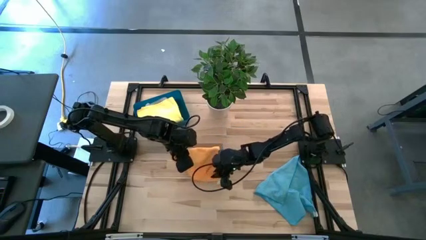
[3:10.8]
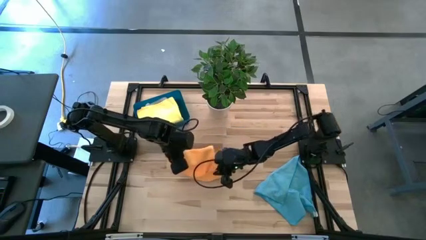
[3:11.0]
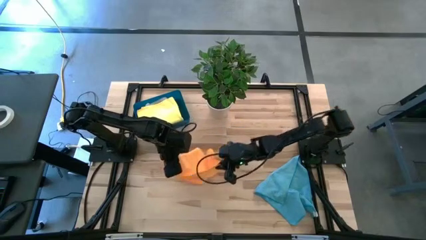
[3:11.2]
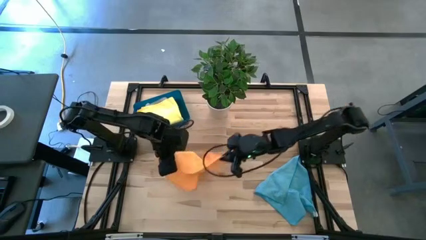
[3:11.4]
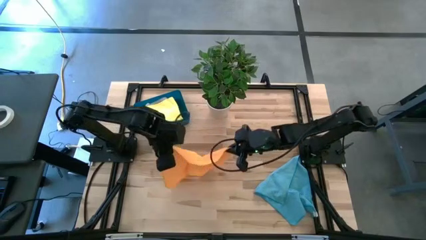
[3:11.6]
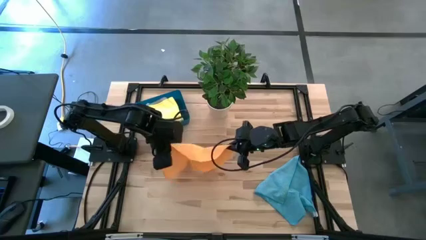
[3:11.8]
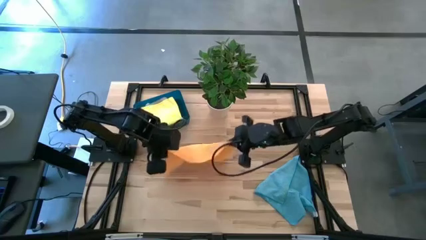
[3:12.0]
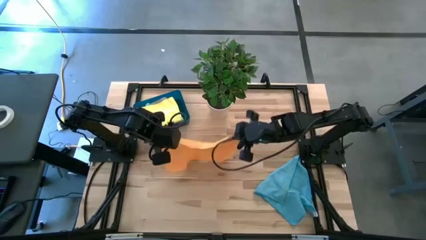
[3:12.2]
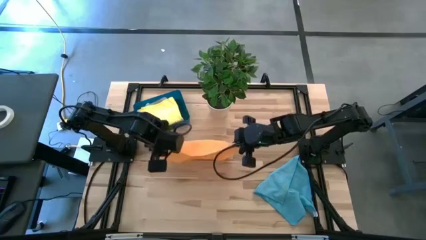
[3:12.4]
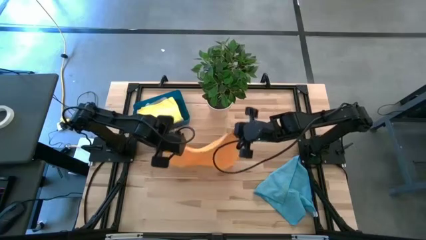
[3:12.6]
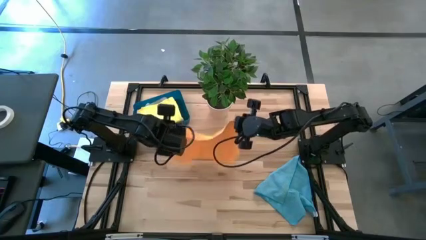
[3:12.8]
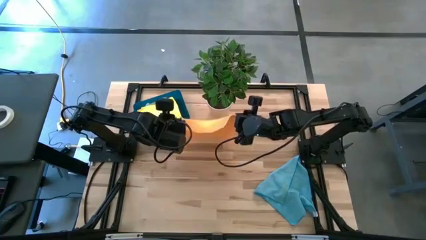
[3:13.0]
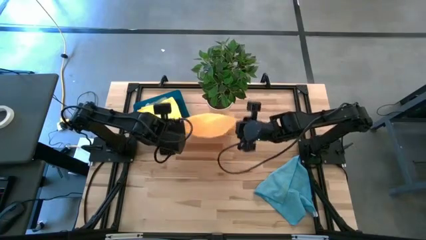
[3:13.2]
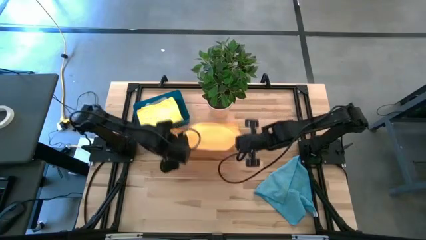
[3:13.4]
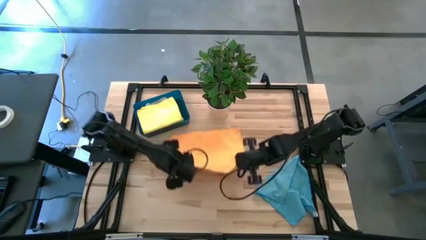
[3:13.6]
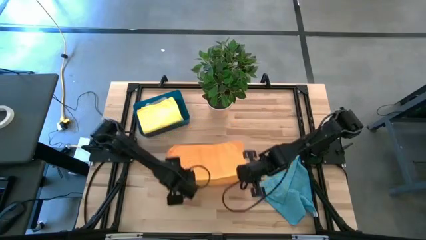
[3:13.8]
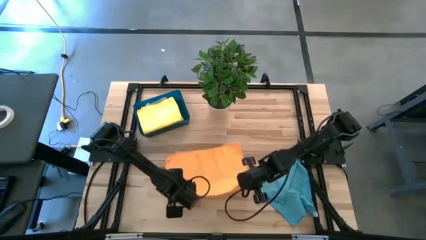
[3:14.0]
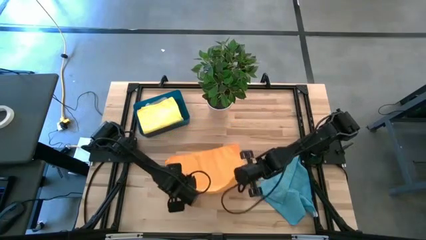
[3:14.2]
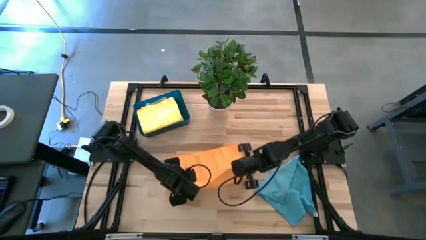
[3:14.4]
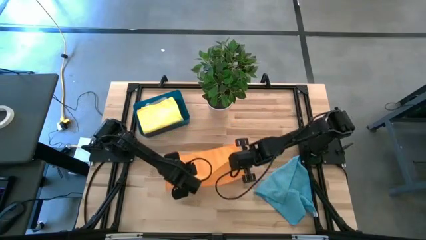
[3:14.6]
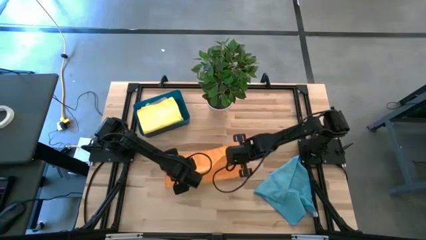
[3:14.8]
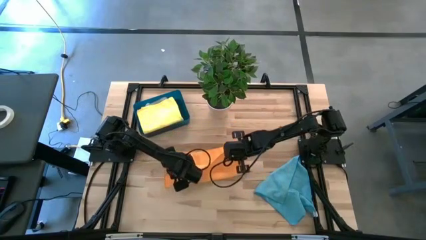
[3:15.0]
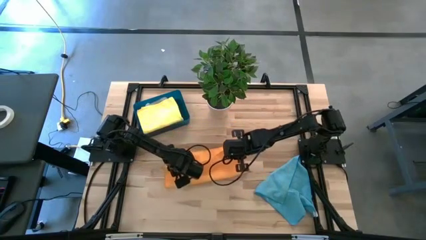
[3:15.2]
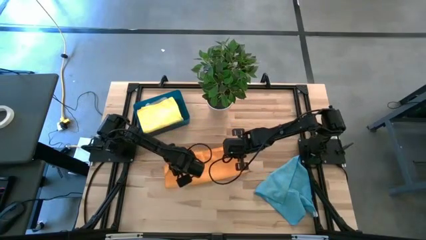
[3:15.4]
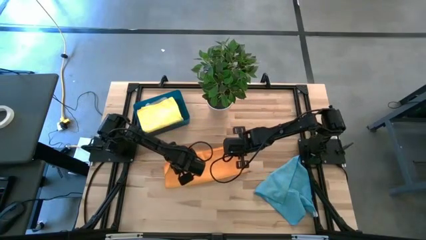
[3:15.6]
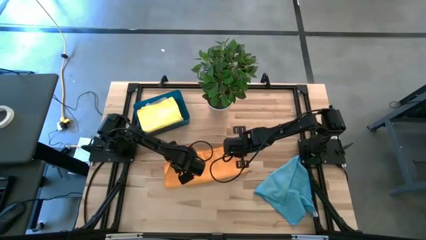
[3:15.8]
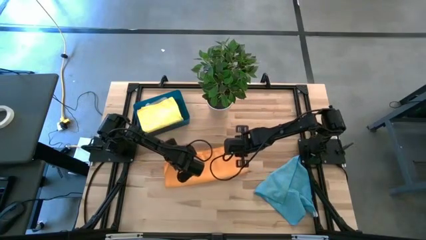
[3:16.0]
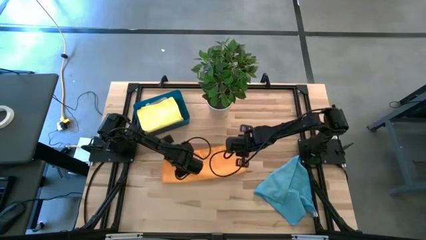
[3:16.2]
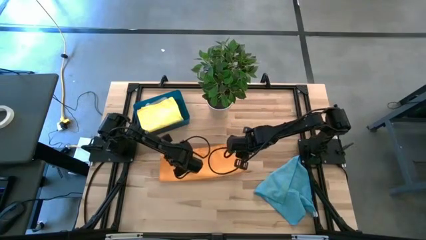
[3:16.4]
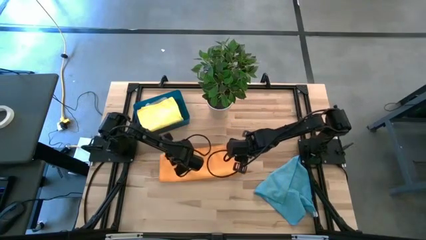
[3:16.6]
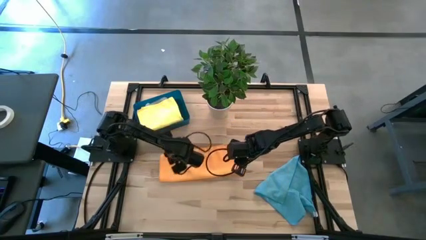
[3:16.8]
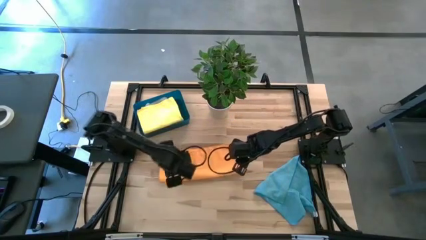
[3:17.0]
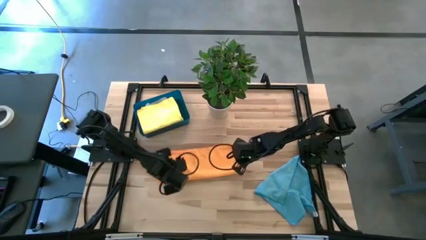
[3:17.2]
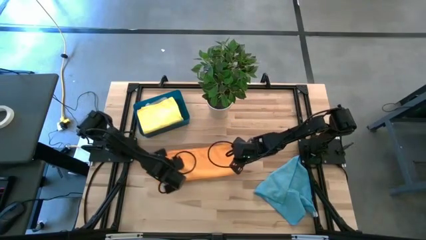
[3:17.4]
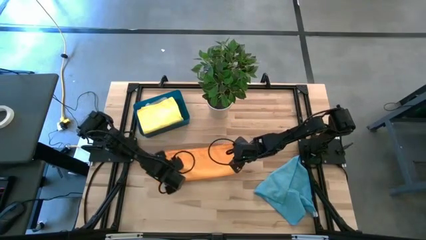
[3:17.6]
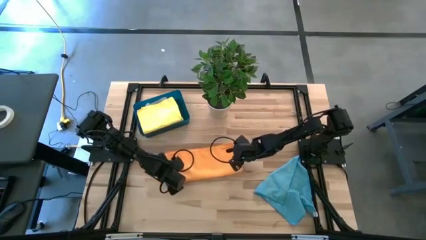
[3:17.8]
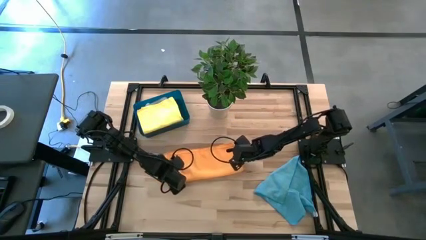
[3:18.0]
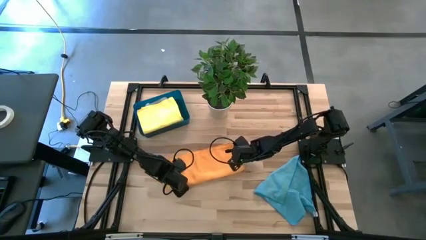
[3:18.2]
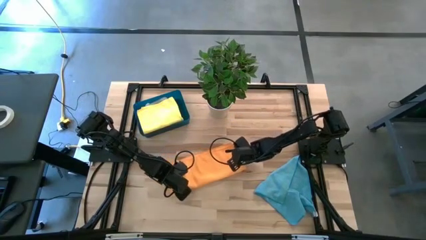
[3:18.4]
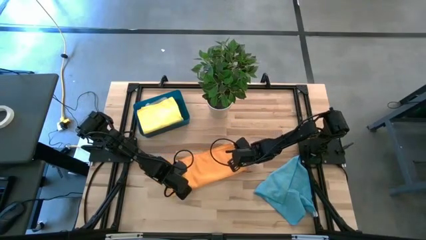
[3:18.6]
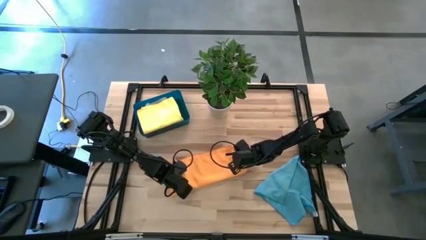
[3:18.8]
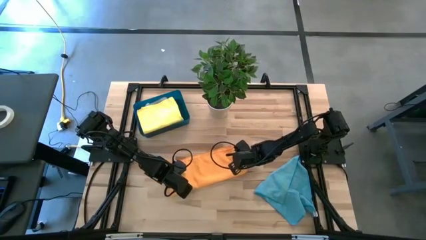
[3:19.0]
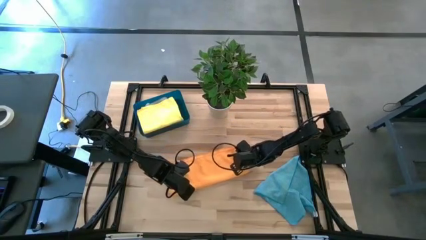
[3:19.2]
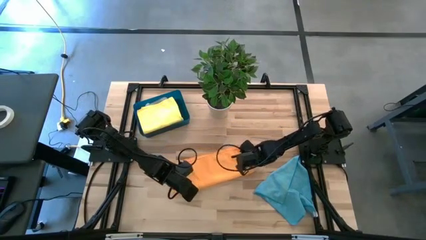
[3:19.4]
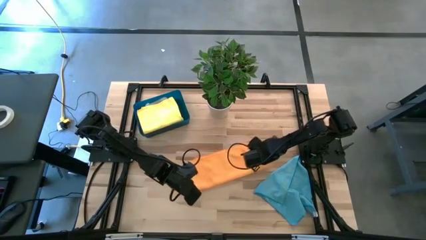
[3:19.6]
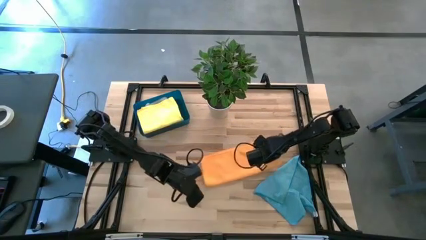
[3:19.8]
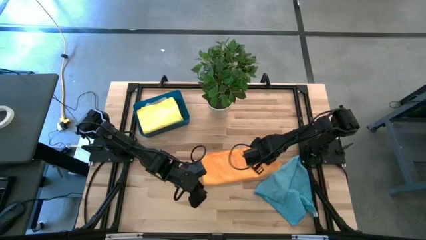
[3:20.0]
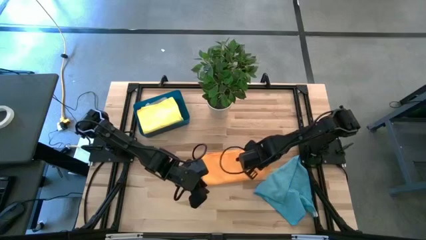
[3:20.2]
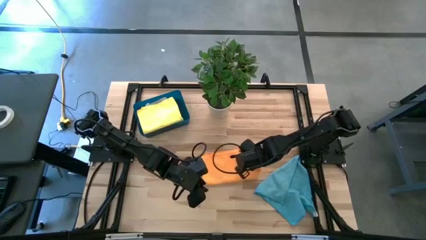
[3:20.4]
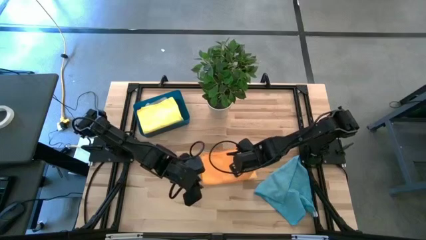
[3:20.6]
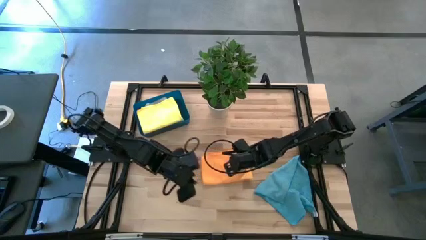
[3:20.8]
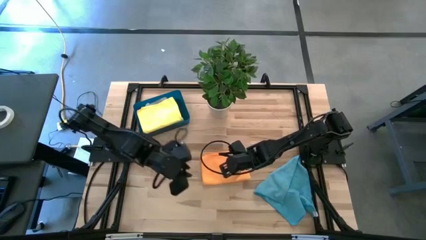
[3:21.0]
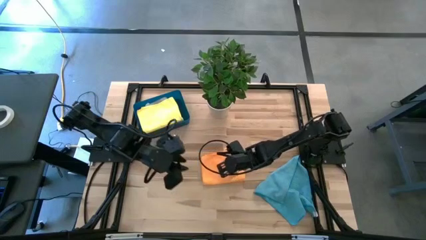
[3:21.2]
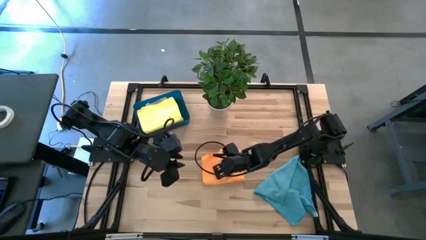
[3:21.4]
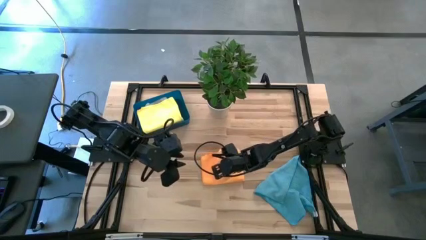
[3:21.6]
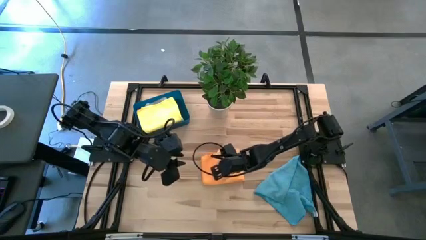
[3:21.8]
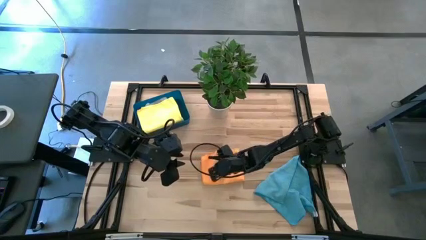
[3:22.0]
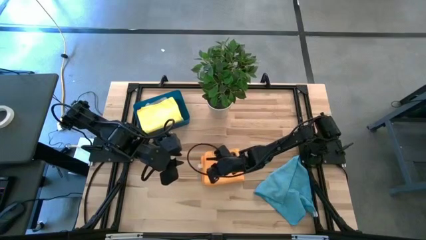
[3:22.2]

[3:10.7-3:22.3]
Task: Fold microfiber towels
Fold the orange towel

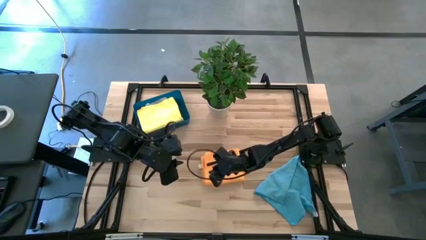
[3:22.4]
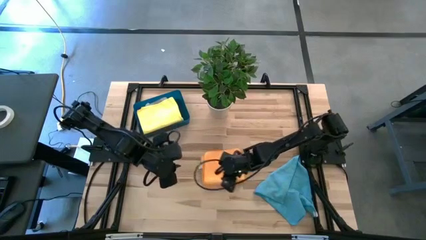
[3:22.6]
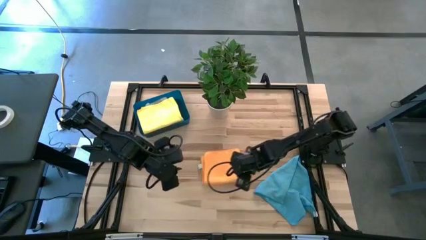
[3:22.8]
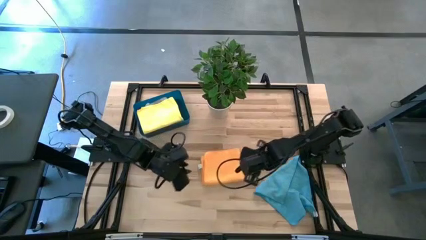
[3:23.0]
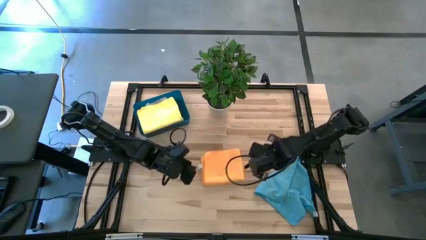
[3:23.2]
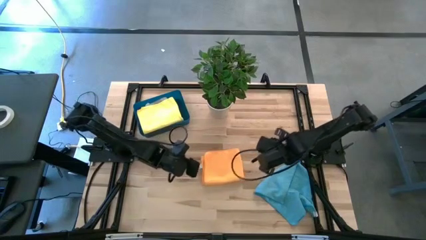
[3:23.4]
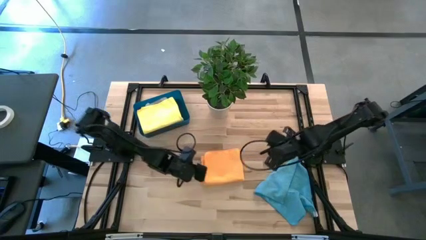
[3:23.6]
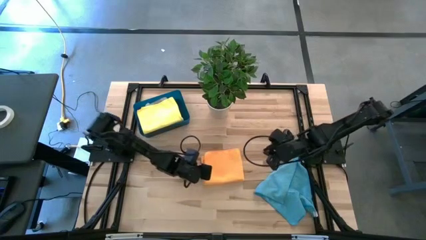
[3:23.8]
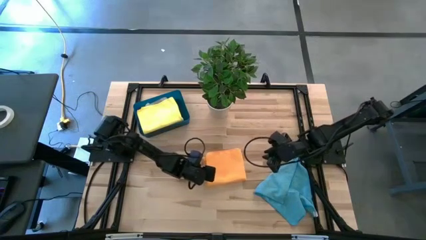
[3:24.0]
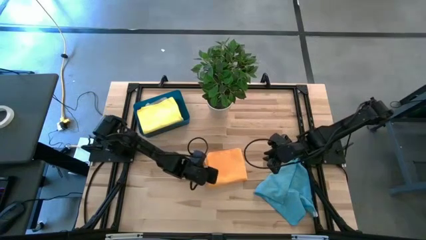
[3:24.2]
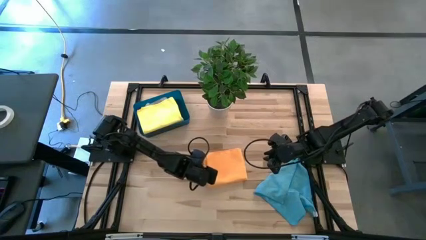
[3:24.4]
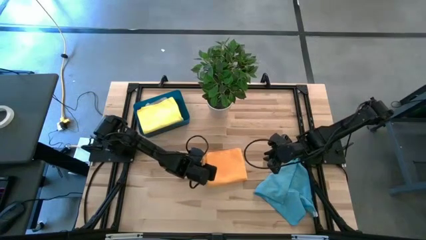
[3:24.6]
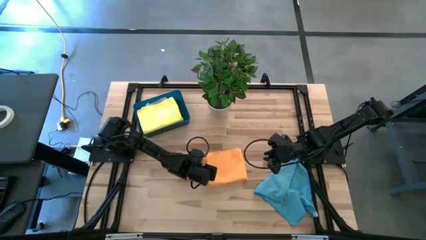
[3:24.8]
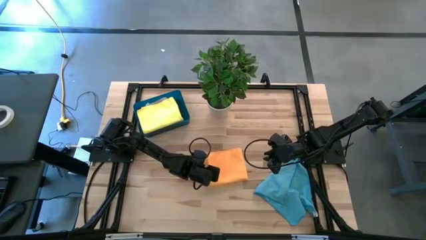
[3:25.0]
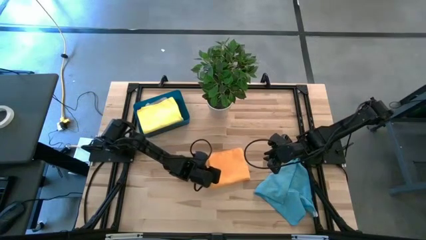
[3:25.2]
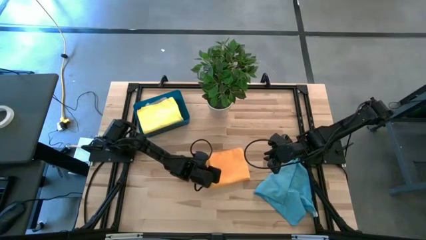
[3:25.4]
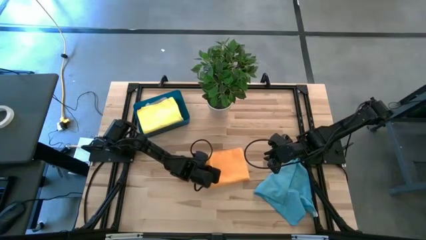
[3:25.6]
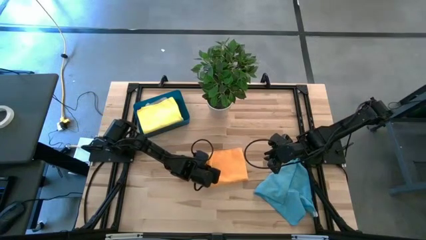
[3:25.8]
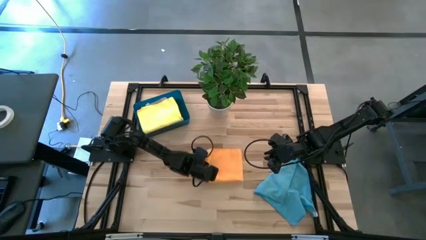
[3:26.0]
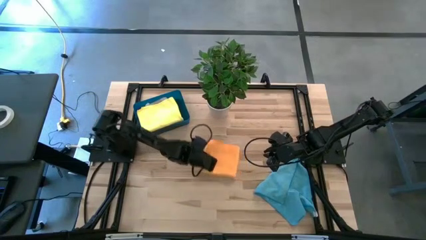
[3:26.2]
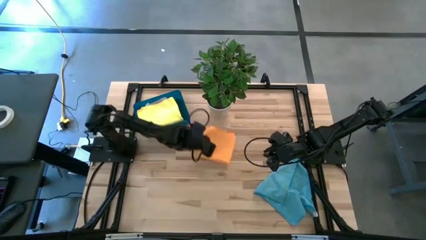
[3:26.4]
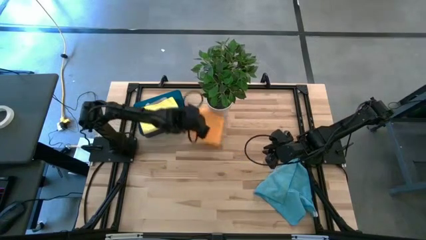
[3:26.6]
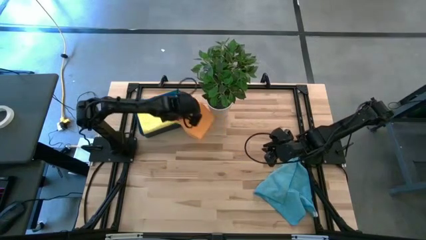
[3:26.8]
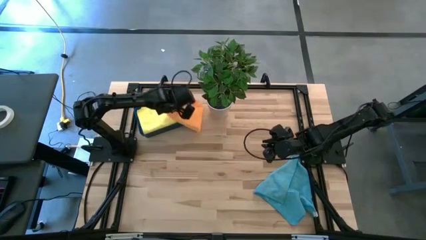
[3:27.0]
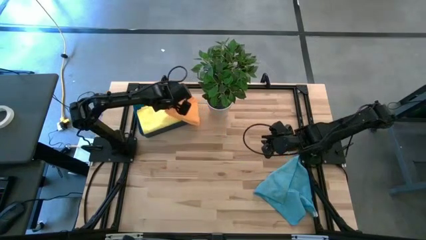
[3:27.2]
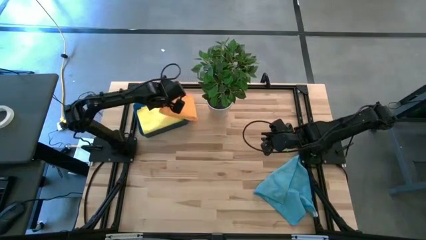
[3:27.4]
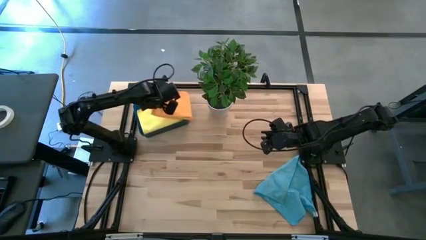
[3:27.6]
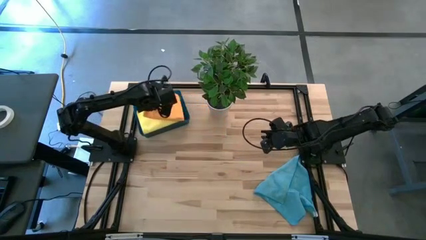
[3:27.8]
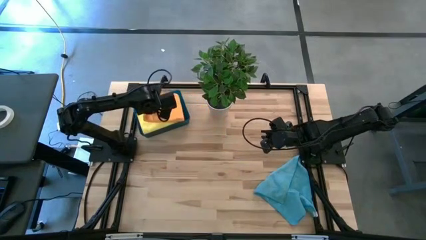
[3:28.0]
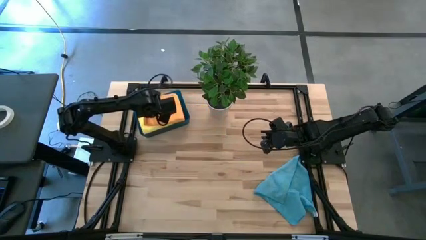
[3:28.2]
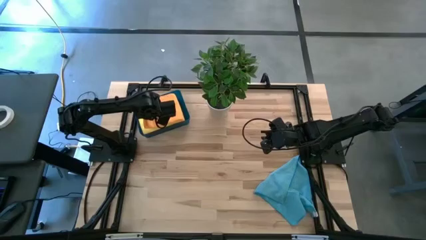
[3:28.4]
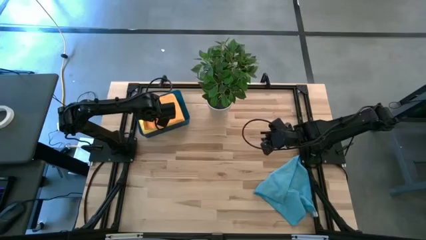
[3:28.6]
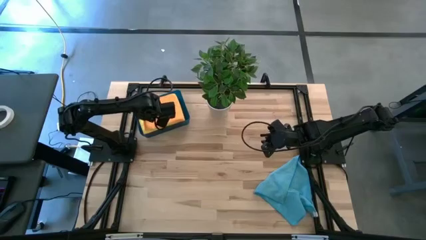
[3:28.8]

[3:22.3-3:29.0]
Put the orange towel into the blue bin
